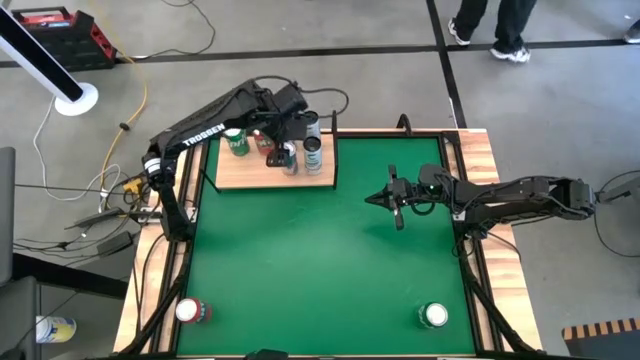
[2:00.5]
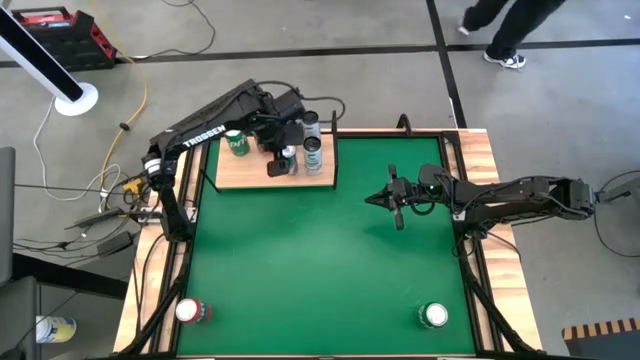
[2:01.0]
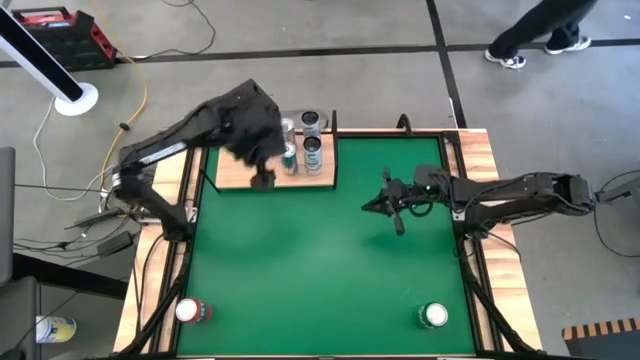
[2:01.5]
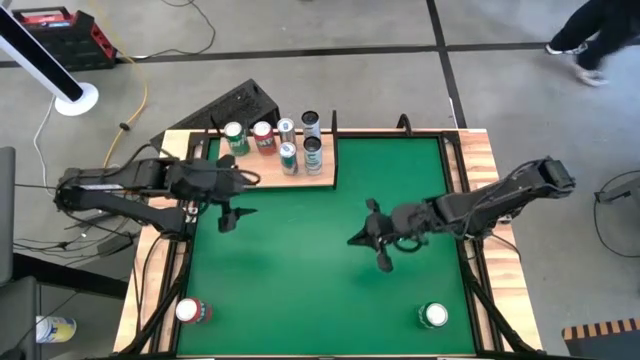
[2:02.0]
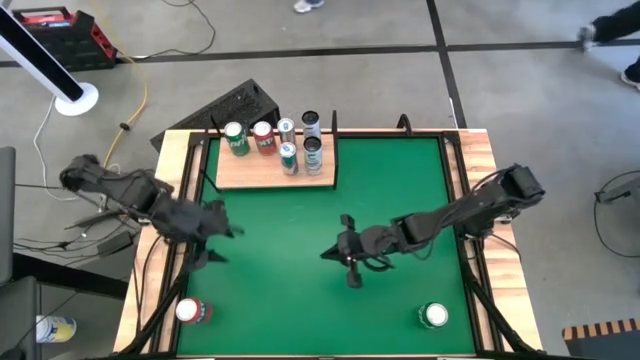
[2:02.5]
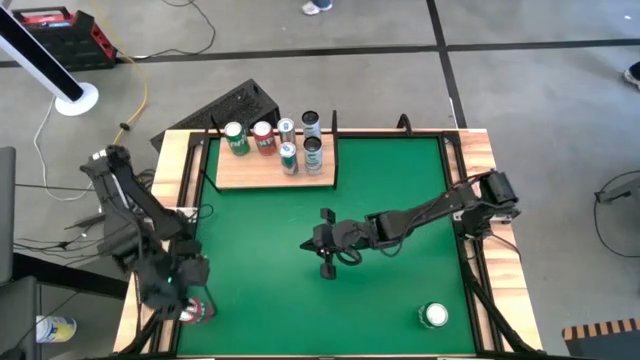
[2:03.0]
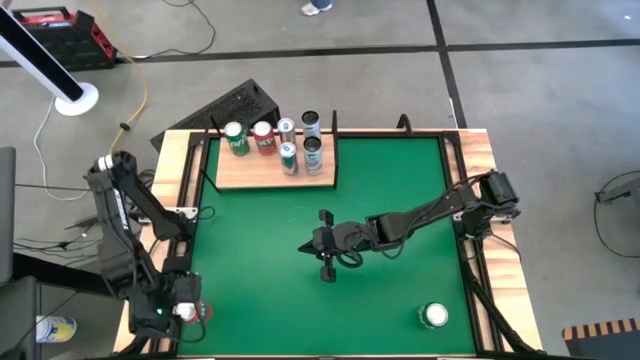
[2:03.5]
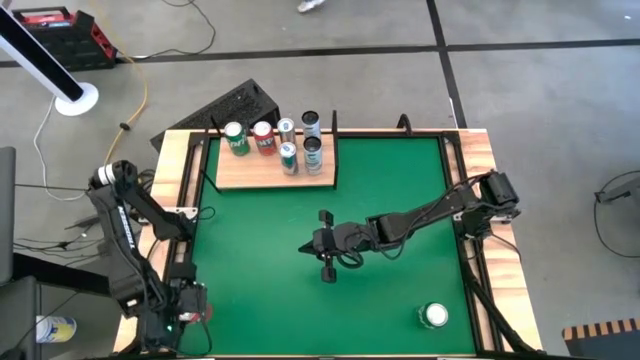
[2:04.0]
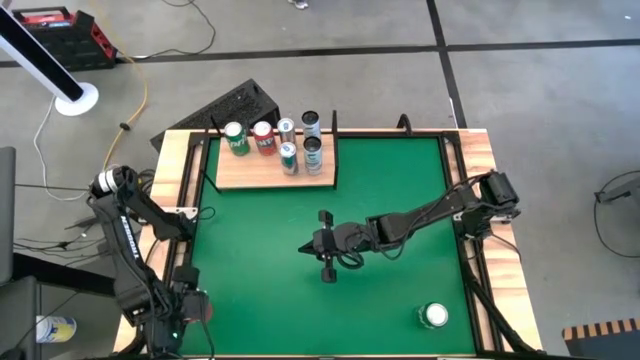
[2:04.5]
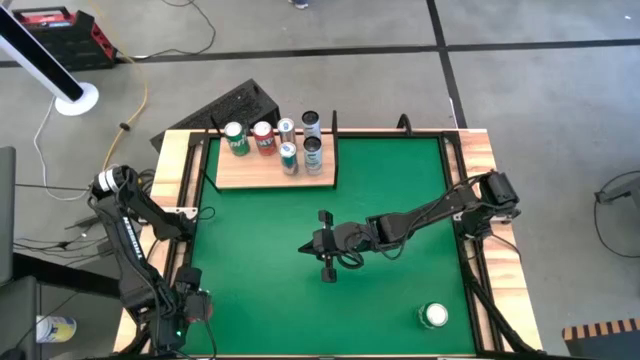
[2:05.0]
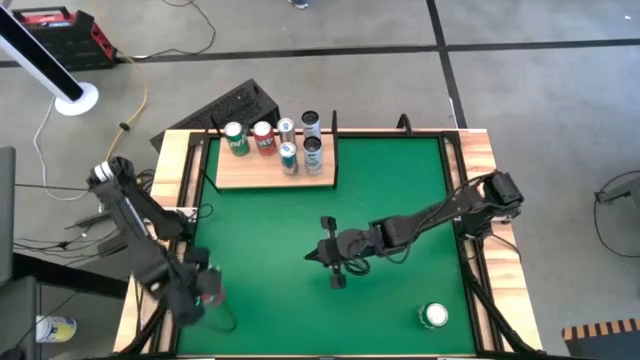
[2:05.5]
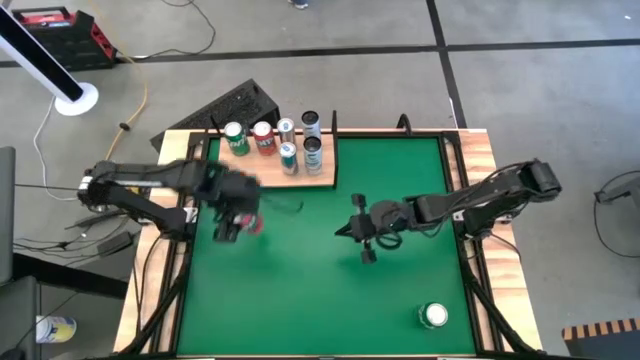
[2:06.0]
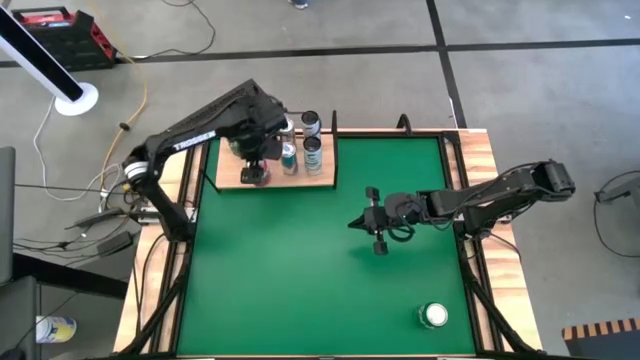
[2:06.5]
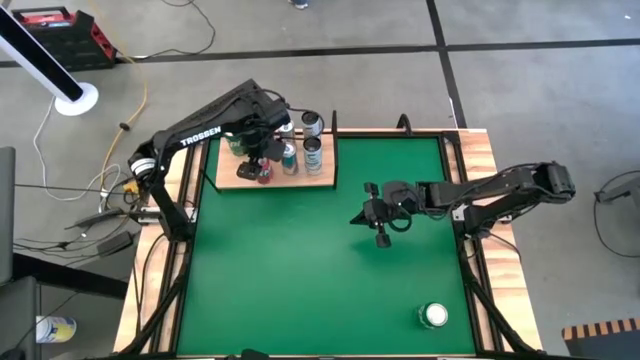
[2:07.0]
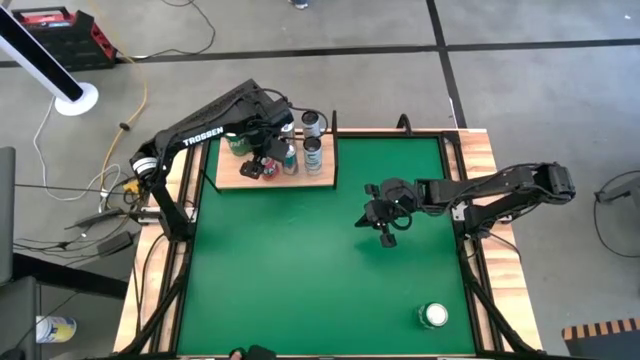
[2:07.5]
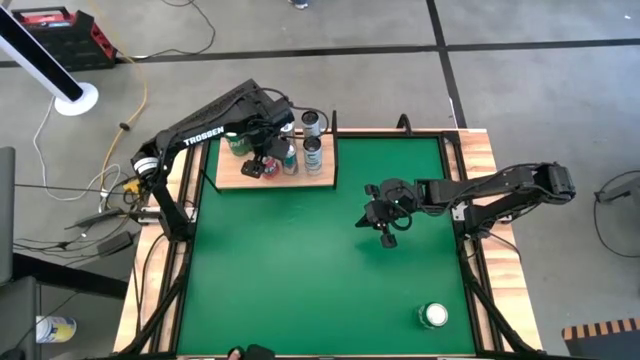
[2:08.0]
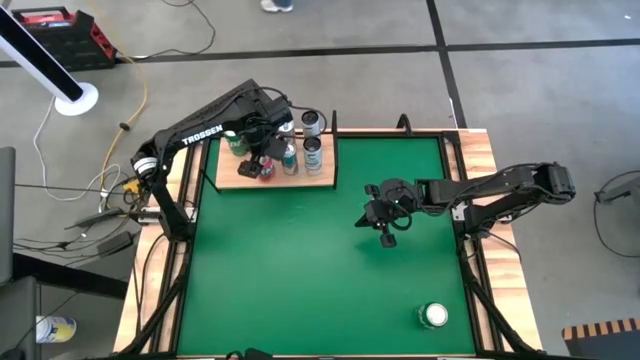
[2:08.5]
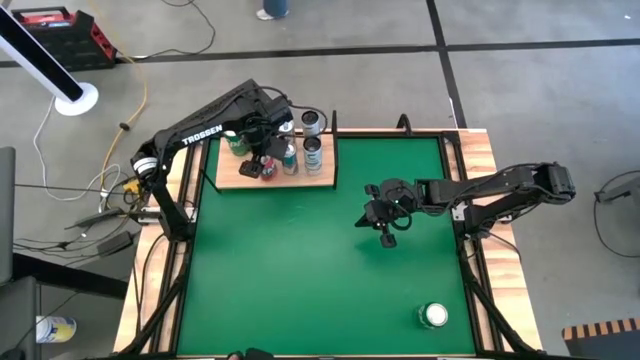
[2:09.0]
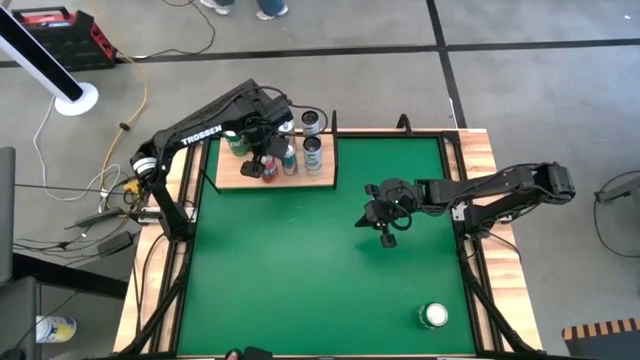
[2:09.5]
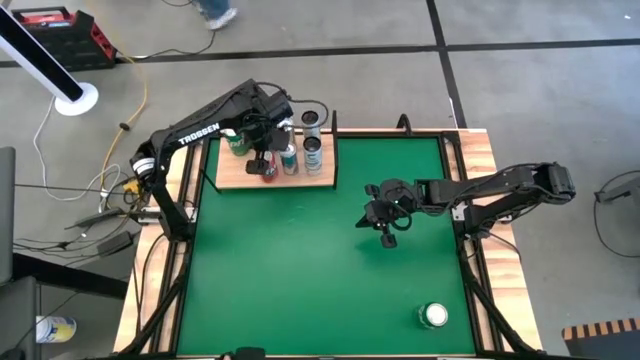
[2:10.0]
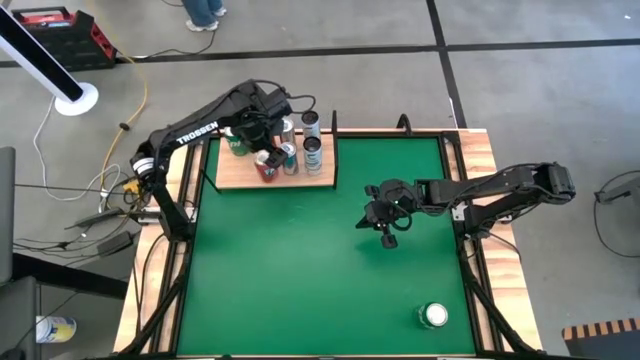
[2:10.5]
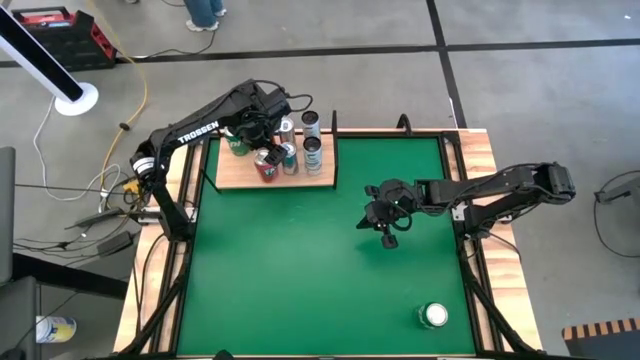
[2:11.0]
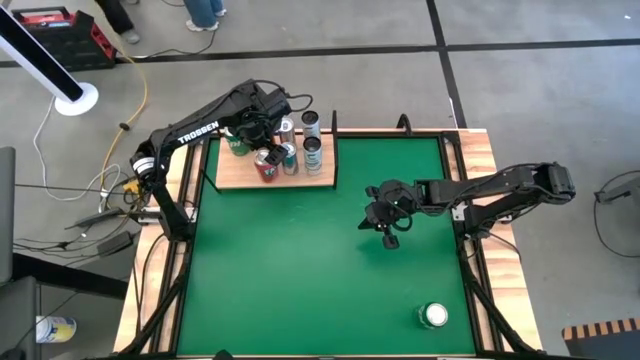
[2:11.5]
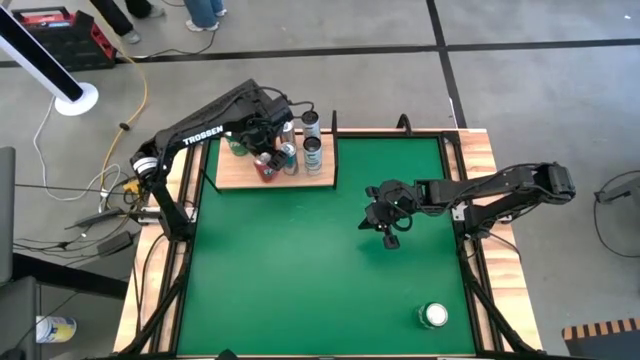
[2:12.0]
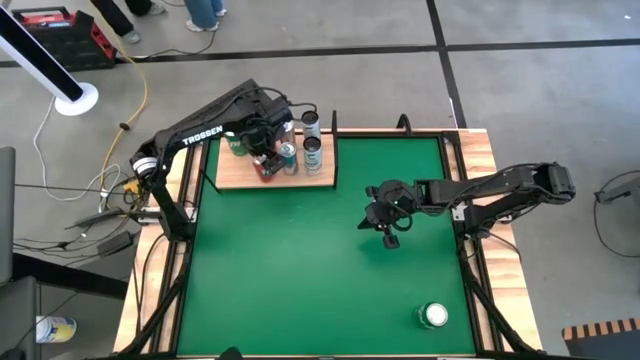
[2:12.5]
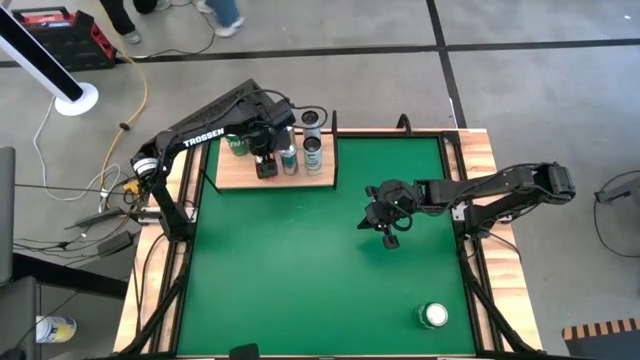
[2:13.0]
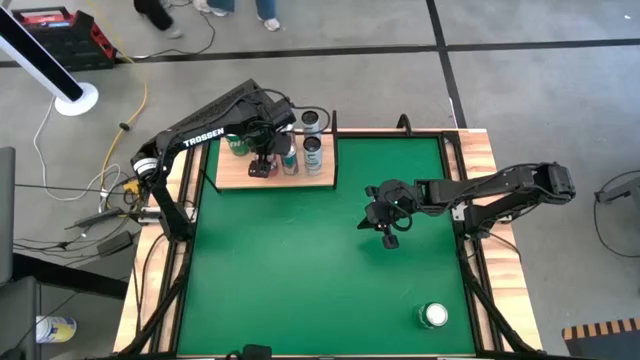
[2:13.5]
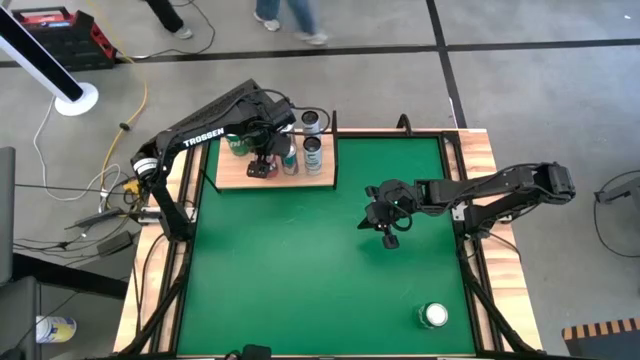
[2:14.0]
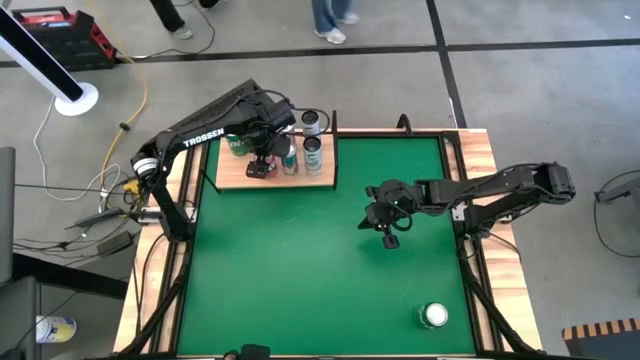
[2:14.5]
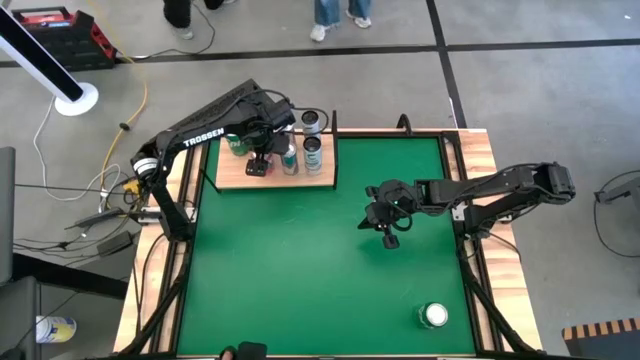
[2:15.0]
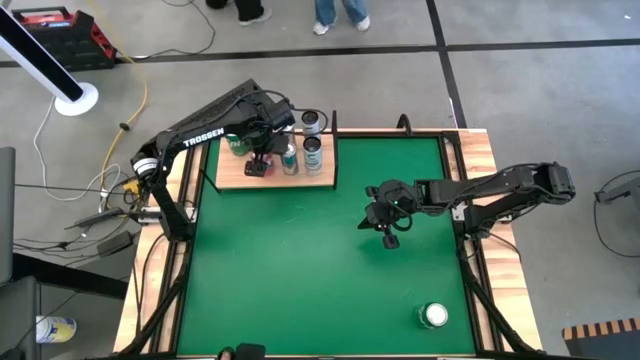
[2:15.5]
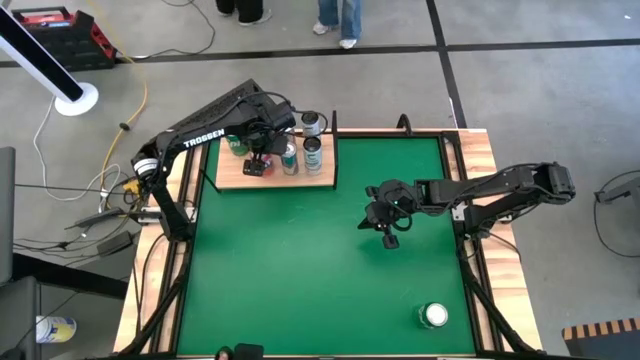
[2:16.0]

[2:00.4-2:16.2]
Task: Place canned beverage on shelf
Put the red soda can on the shelf aligned with the other red soda can

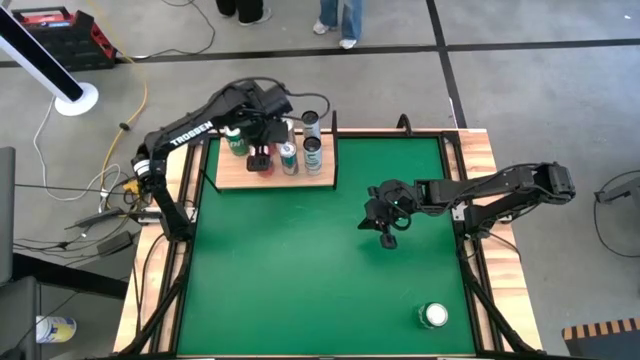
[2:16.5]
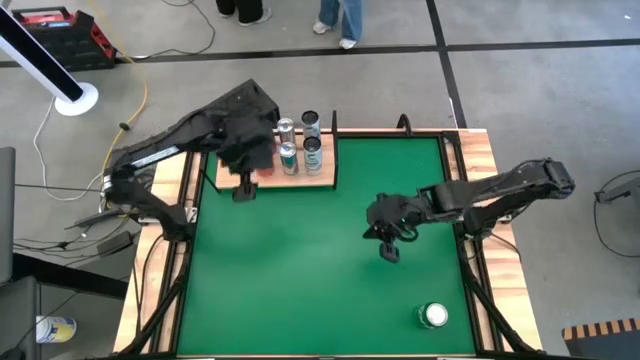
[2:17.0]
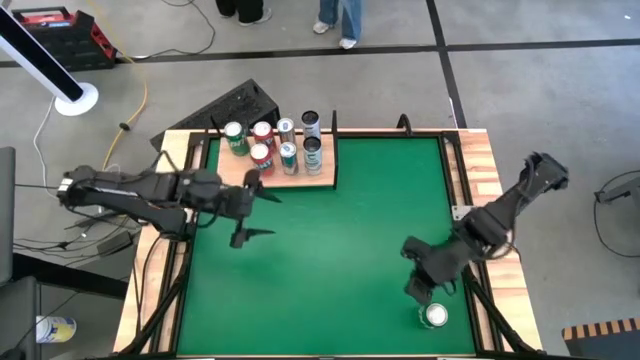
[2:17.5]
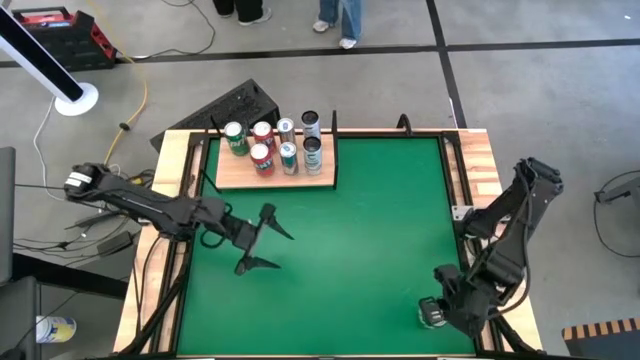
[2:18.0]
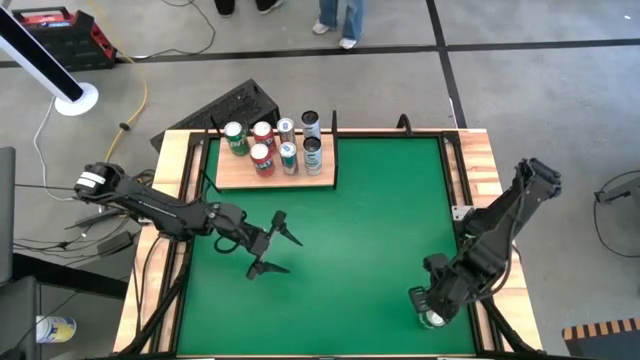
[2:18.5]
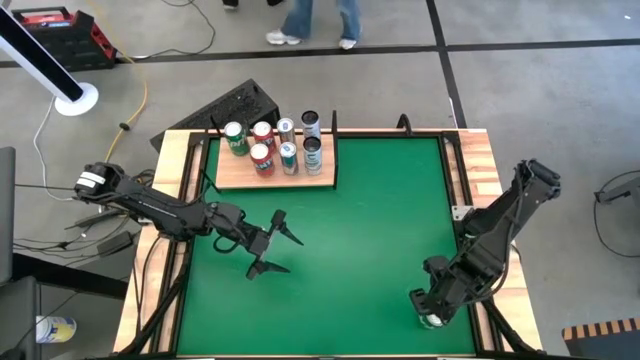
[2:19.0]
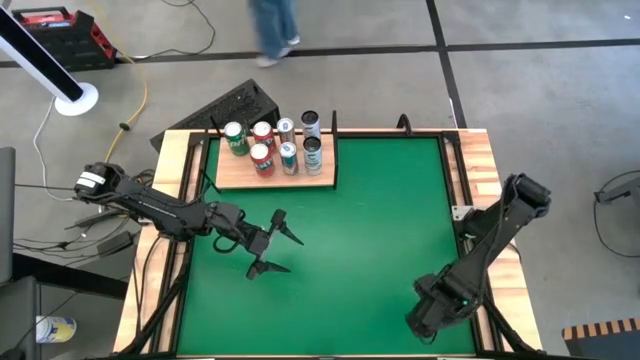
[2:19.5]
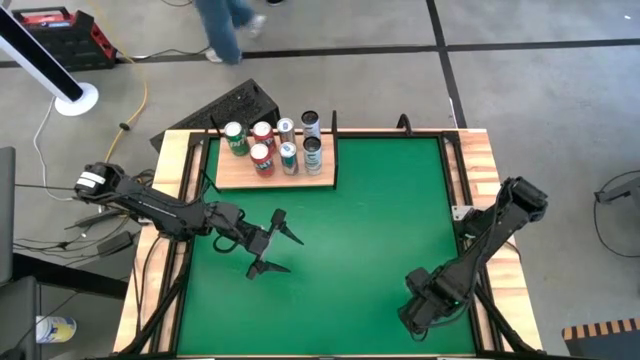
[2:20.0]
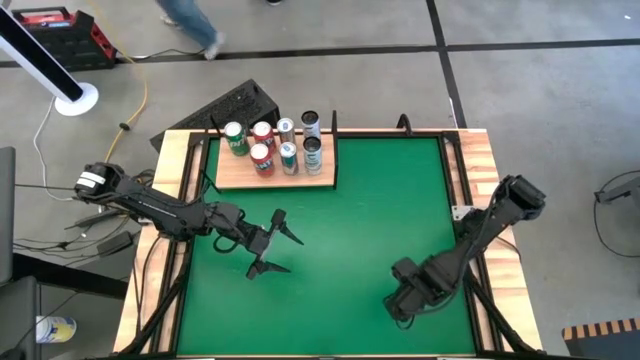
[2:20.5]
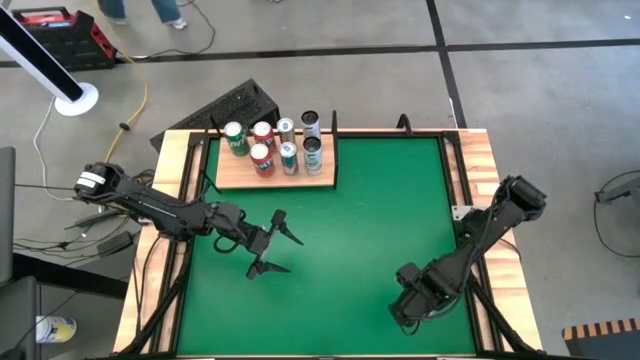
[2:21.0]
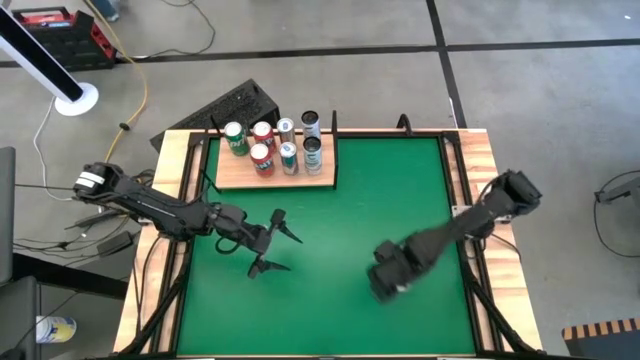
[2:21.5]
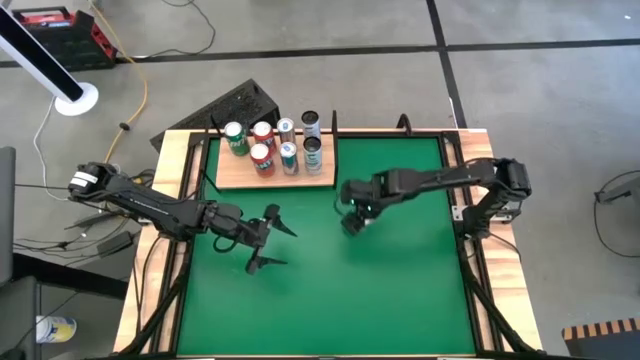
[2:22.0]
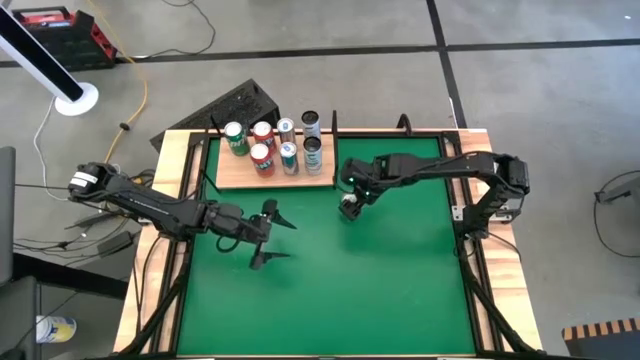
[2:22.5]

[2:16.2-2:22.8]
Move the green soda can to the center of the table
